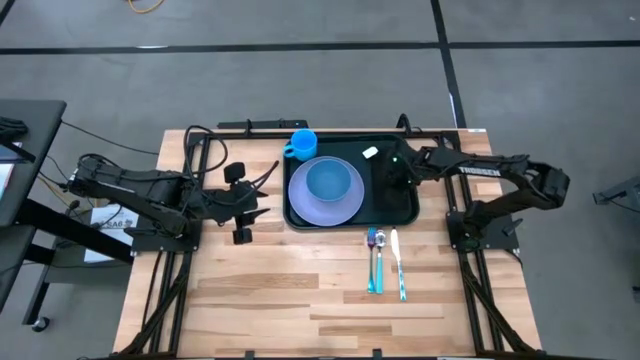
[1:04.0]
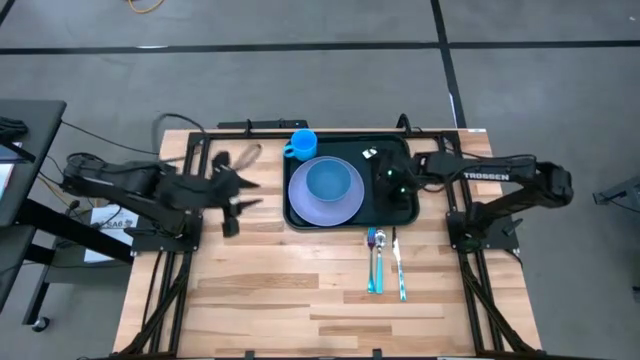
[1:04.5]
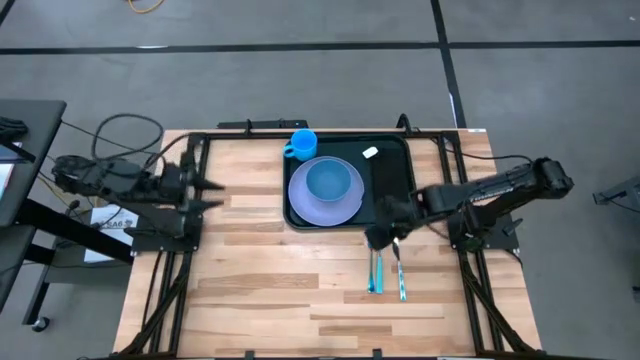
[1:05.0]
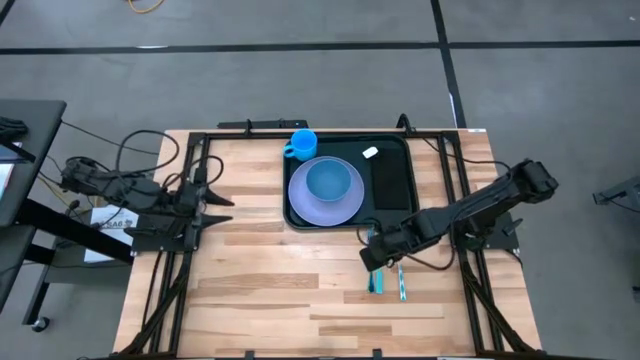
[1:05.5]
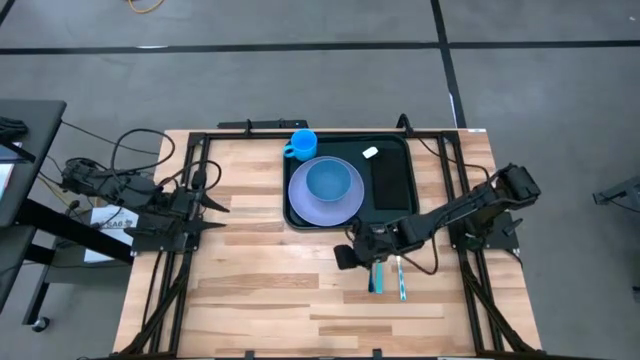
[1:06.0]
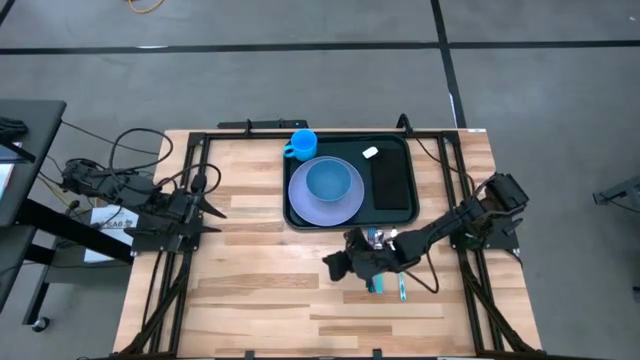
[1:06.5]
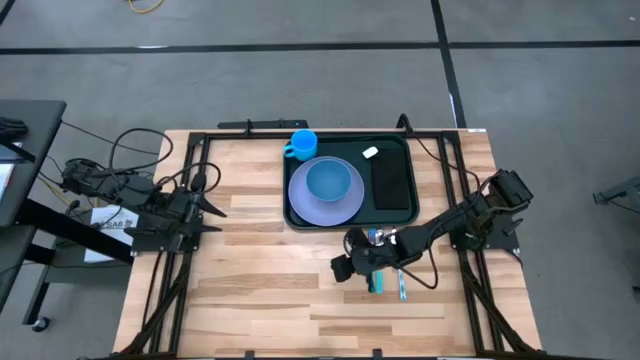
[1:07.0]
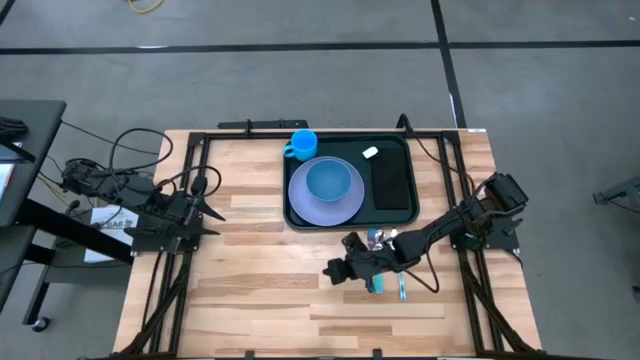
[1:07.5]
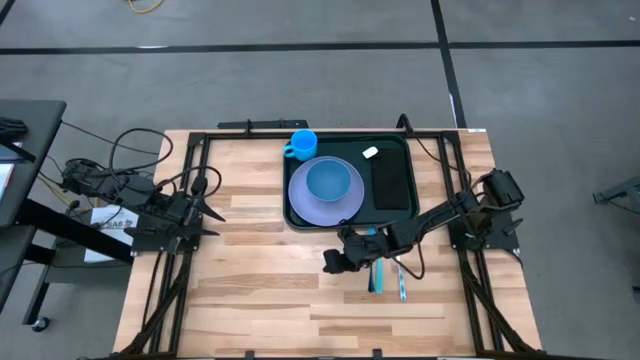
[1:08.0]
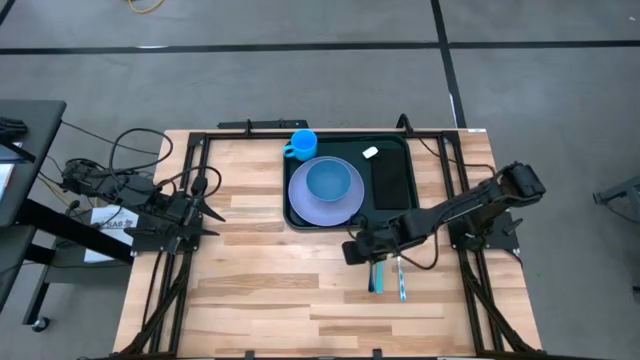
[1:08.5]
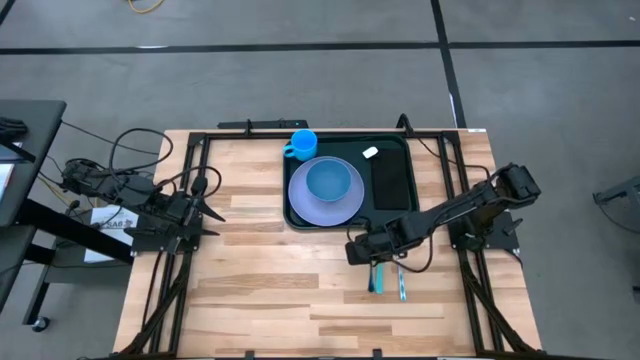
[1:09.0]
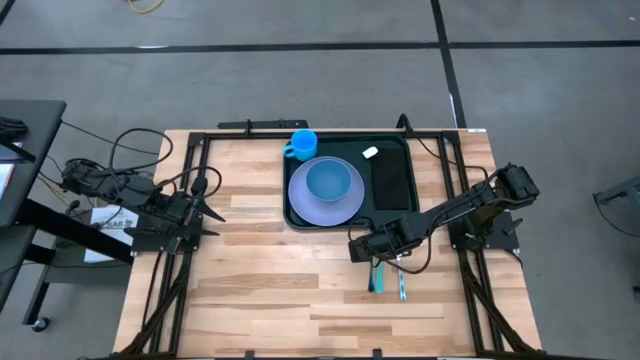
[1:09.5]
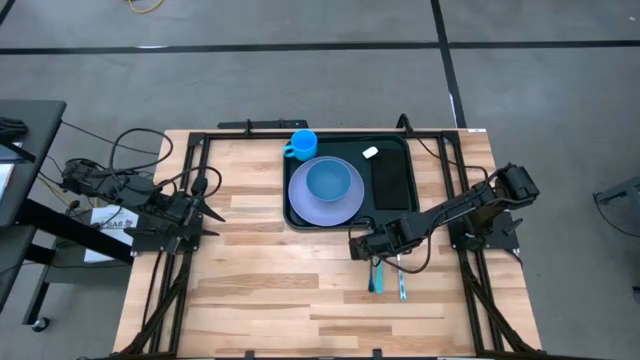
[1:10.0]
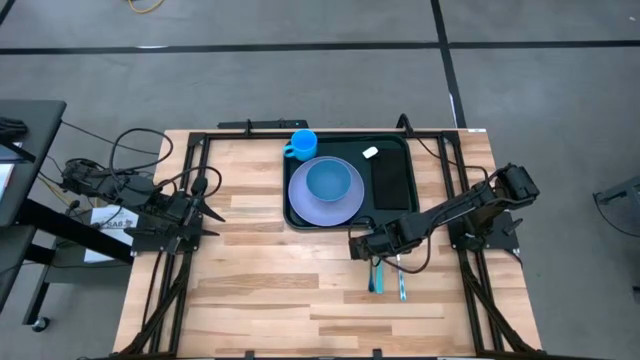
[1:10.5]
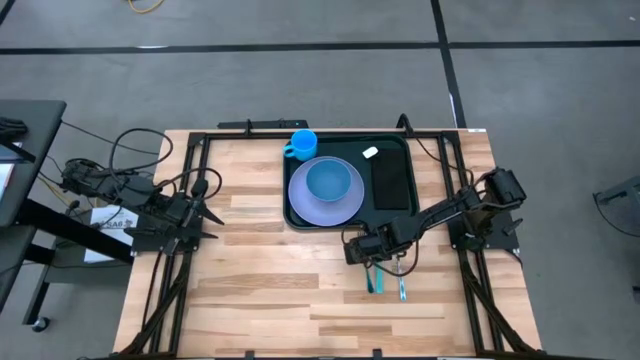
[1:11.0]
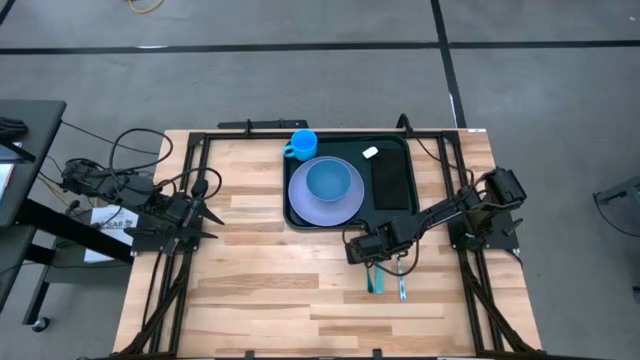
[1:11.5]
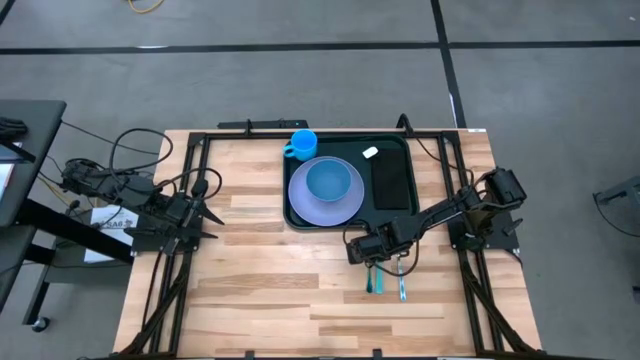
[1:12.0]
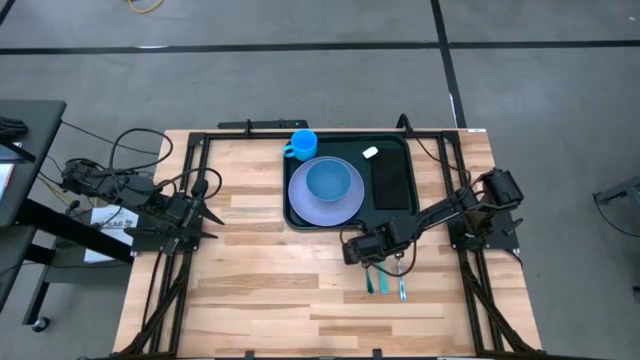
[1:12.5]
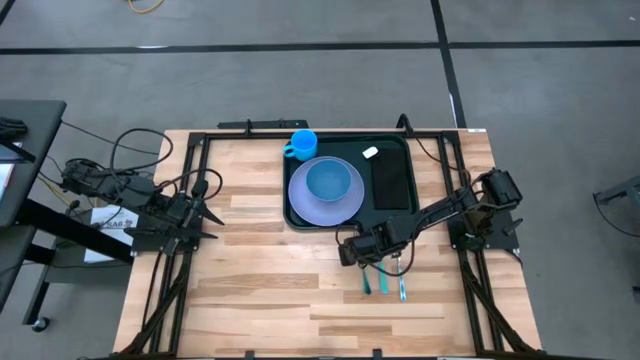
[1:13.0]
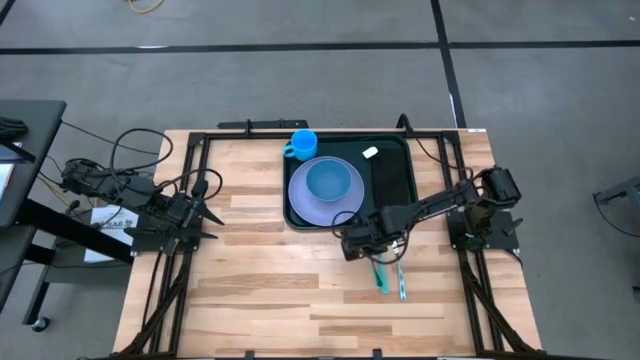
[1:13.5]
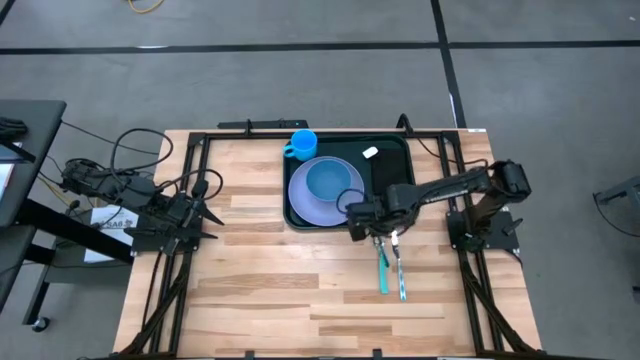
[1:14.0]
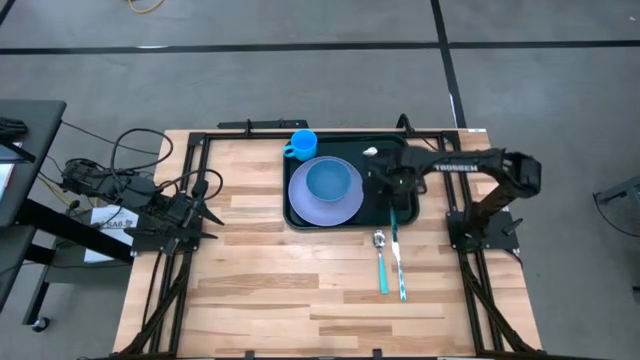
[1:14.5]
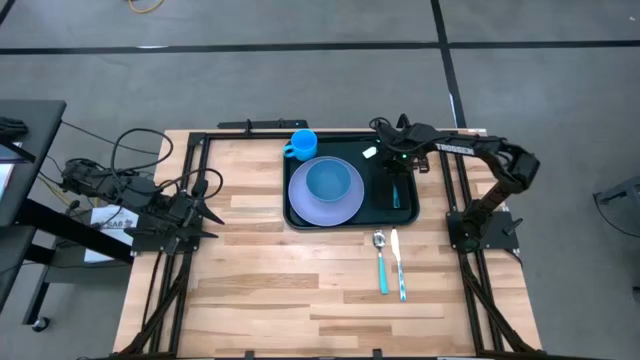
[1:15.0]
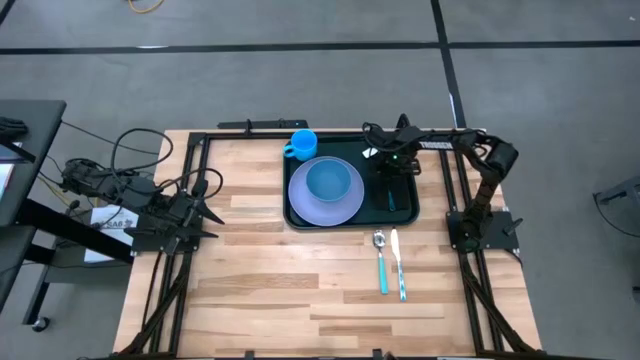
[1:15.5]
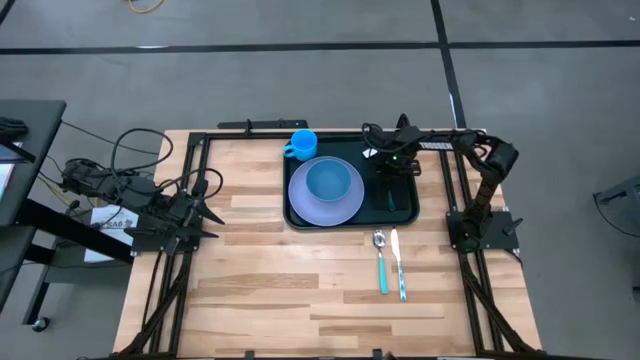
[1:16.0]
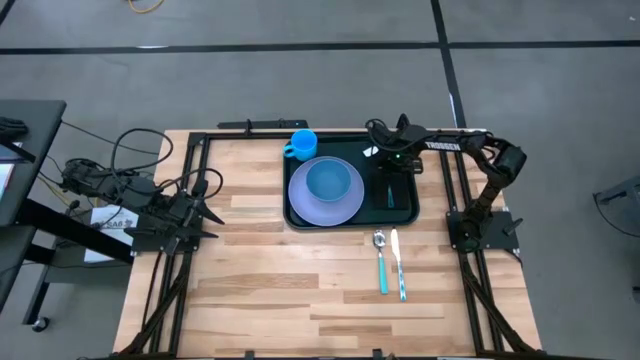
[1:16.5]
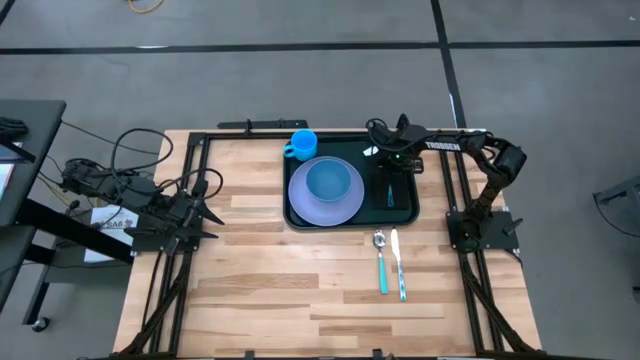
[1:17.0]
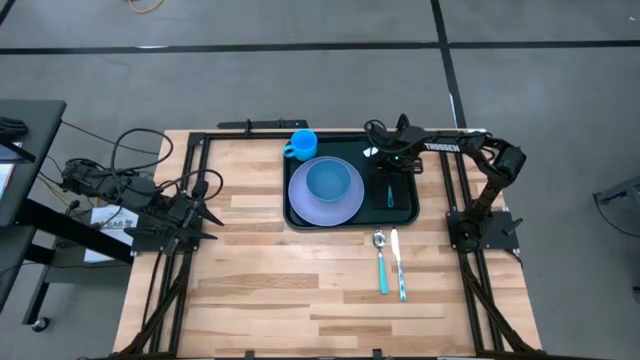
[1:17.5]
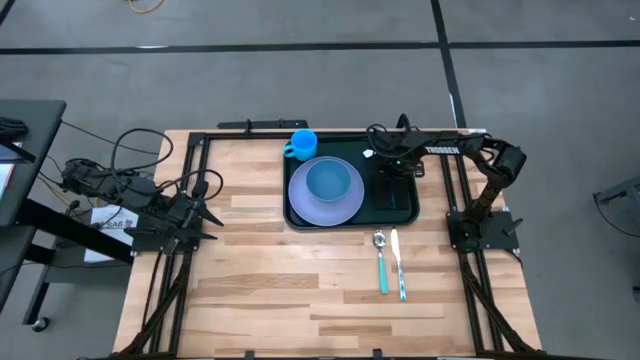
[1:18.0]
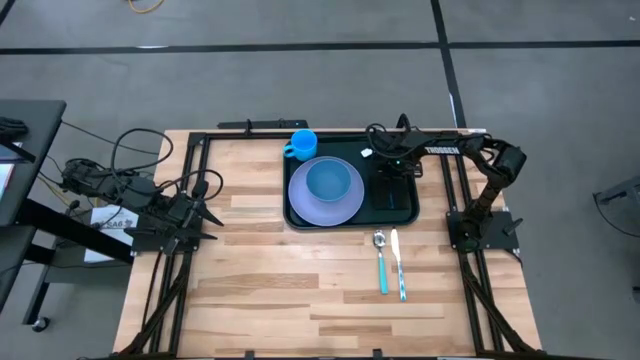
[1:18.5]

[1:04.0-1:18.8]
Task: Set up tray
Put the iridescent fork on the black napkin

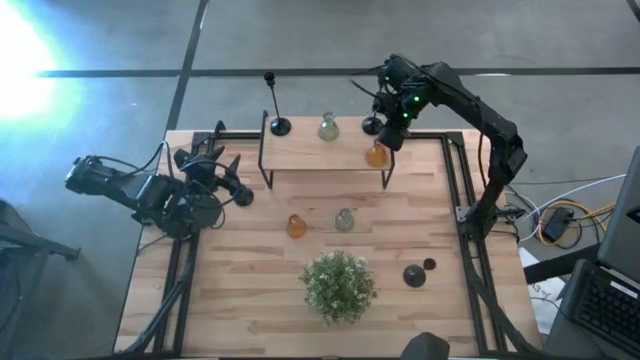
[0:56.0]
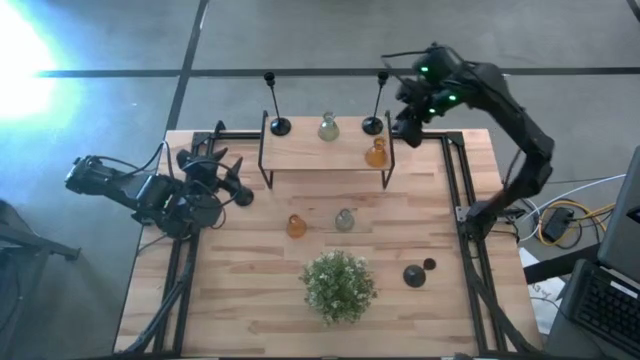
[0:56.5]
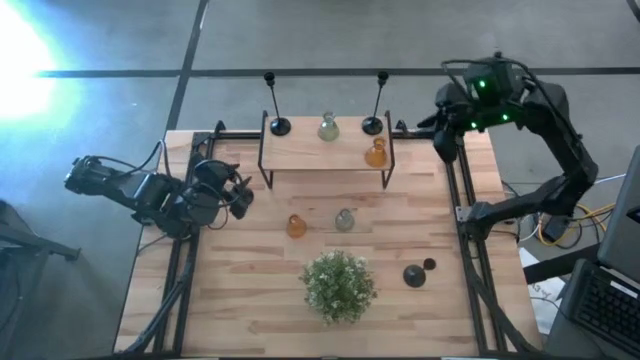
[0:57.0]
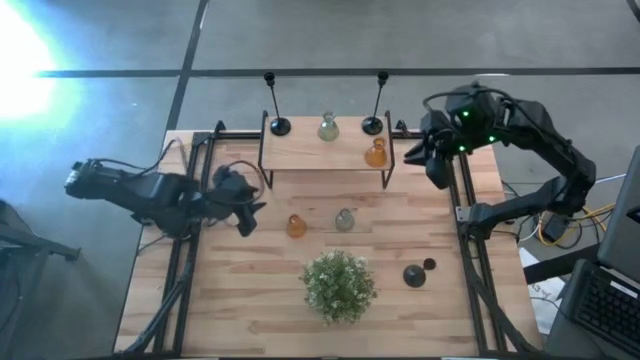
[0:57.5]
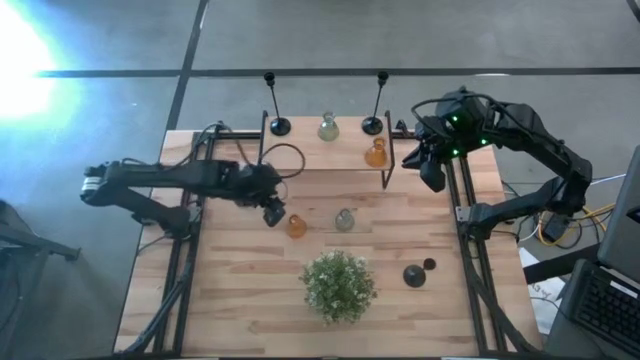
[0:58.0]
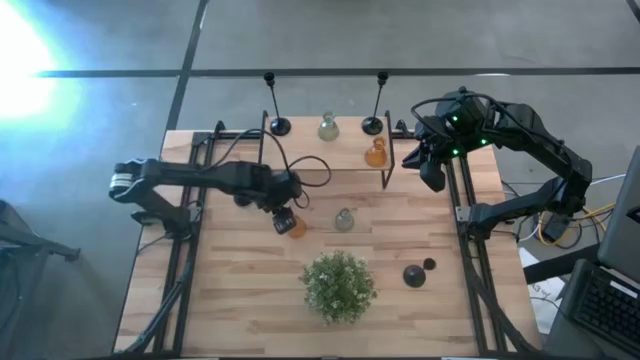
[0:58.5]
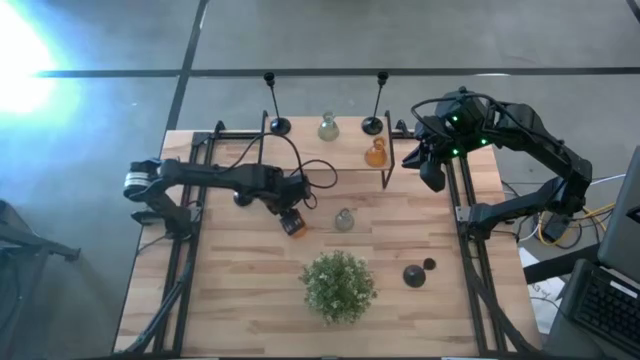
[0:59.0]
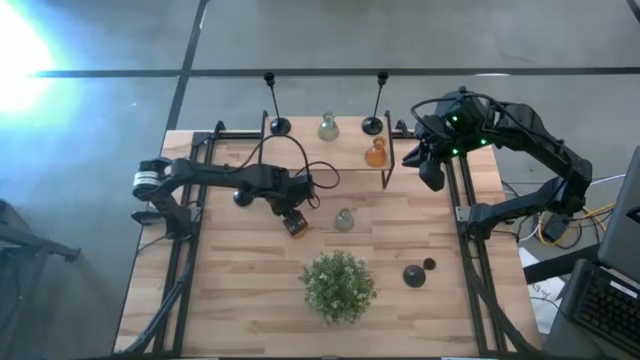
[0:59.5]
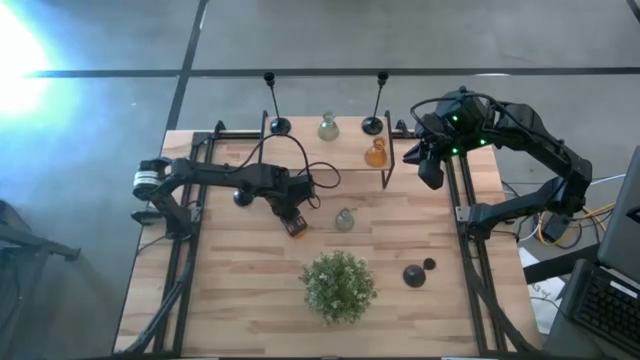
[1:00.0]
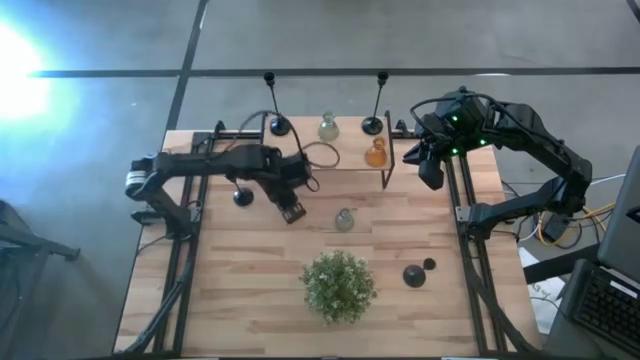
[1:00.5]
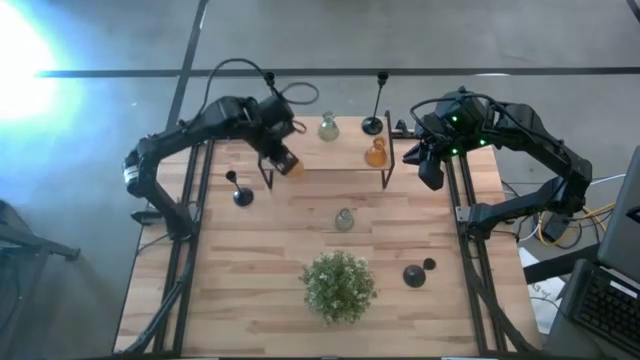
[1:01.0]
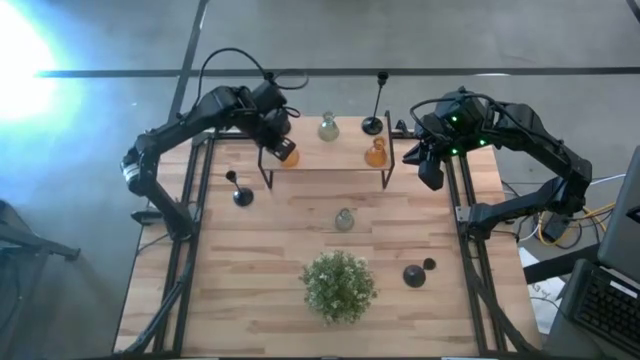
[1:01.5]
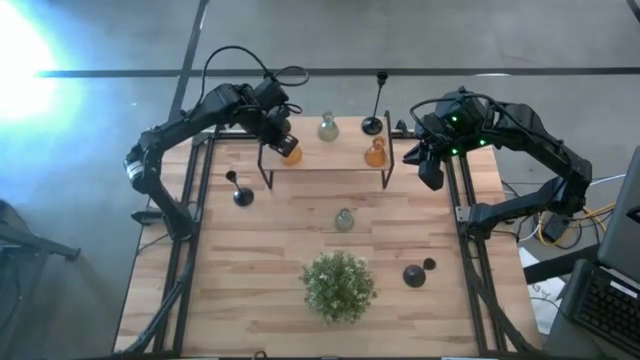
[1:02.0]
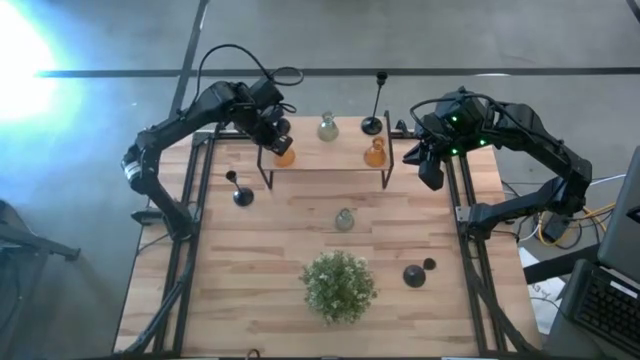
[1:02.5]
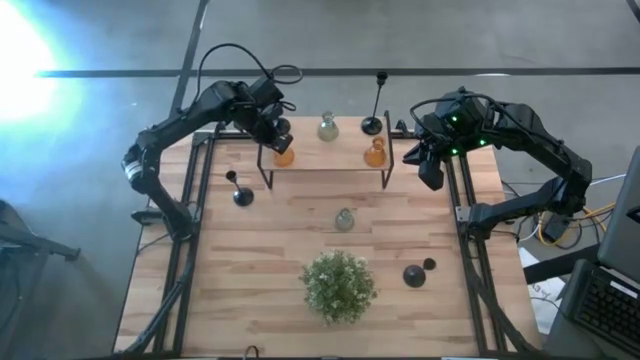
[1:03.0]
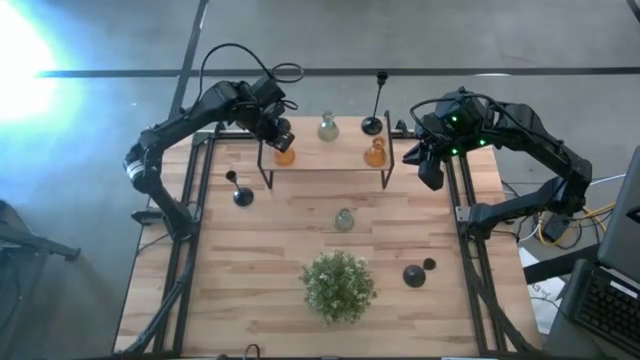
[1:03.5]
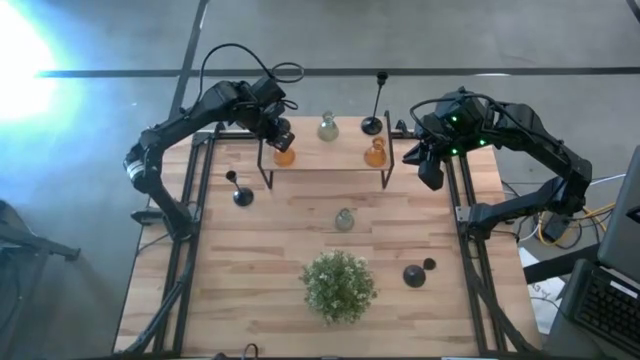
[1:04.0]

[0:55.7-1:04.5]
Task: Pick & Place candle stick holders
Put the orange glass candle holder on the shelf
